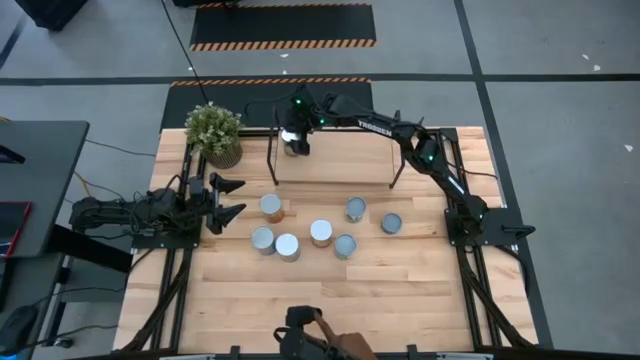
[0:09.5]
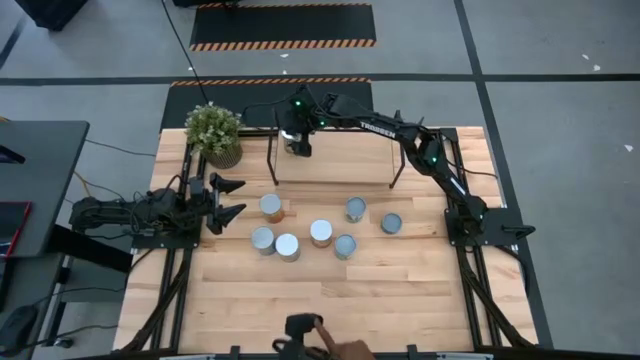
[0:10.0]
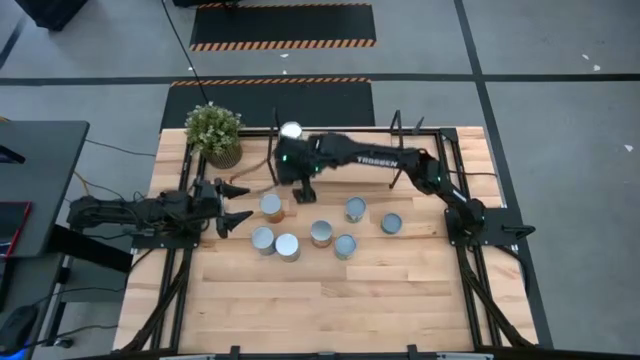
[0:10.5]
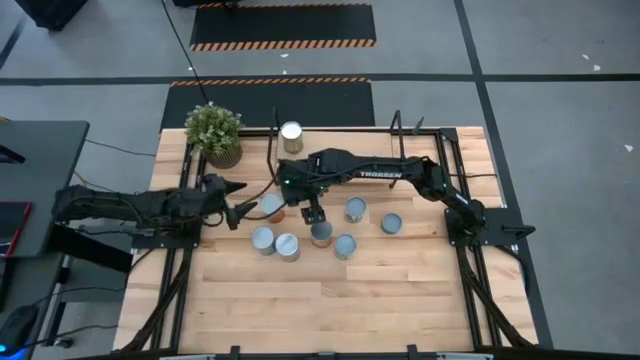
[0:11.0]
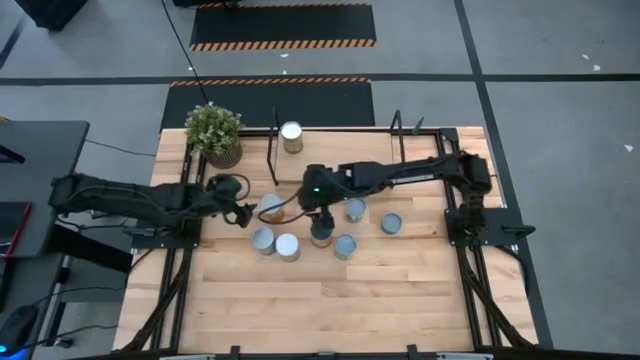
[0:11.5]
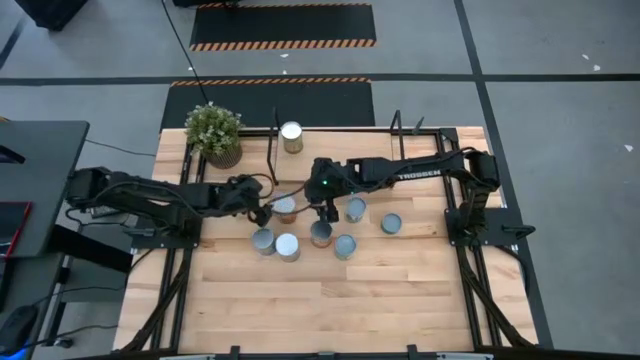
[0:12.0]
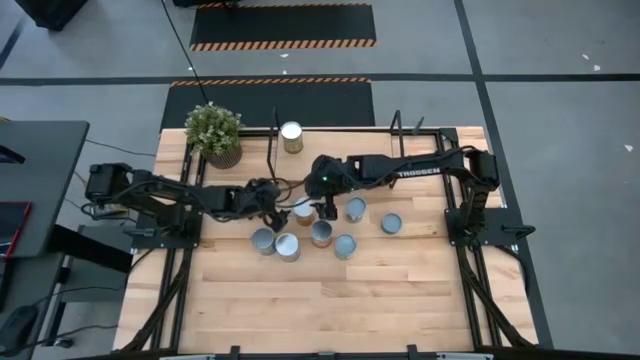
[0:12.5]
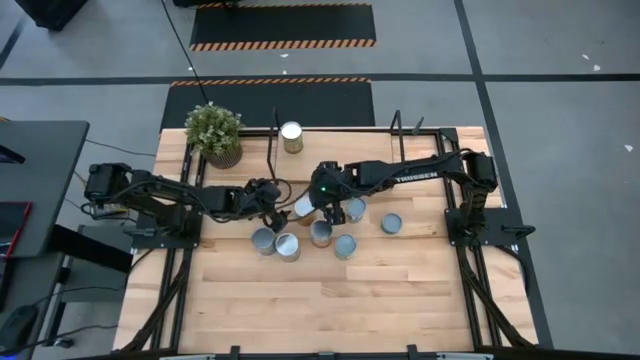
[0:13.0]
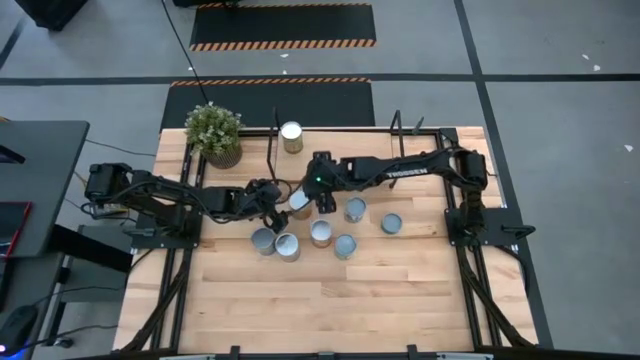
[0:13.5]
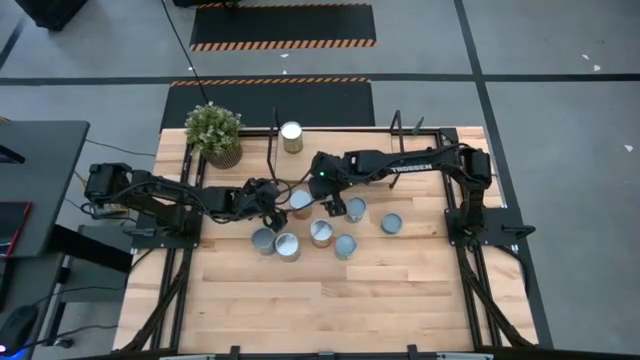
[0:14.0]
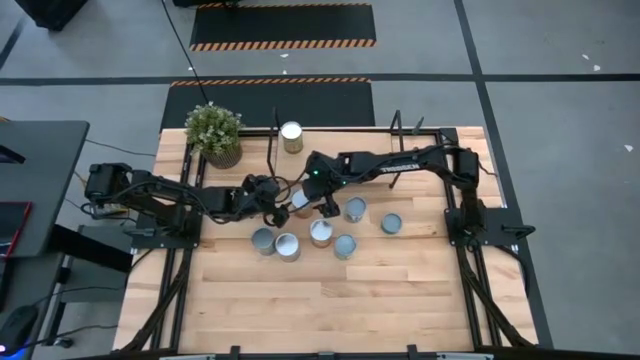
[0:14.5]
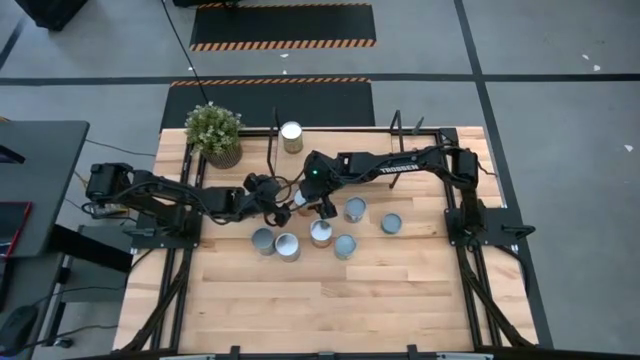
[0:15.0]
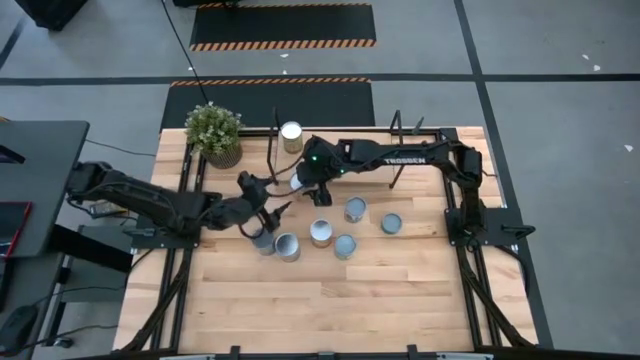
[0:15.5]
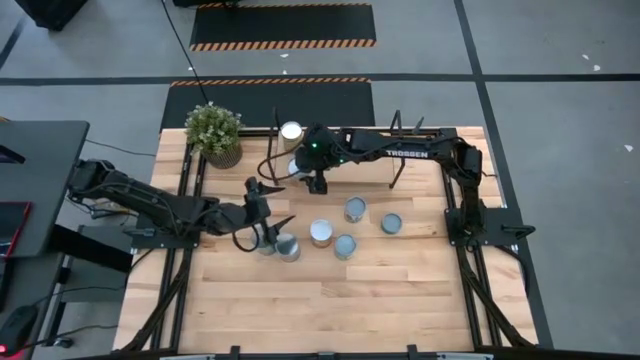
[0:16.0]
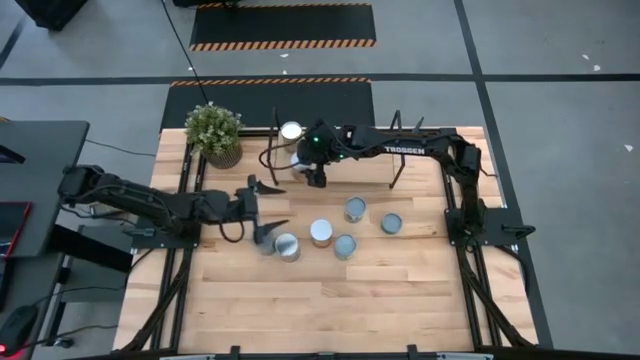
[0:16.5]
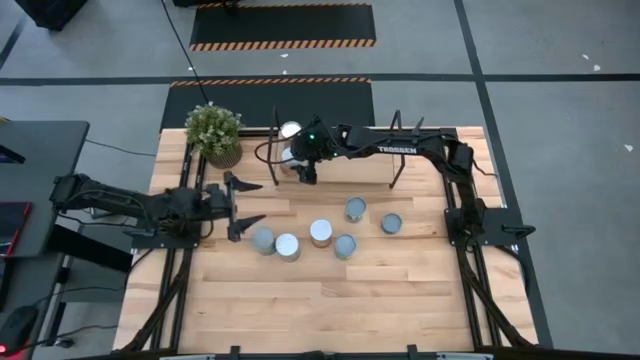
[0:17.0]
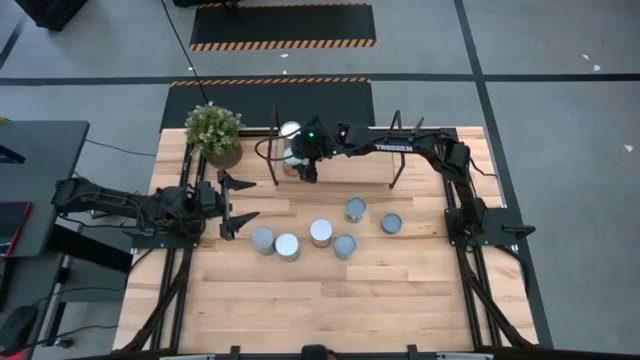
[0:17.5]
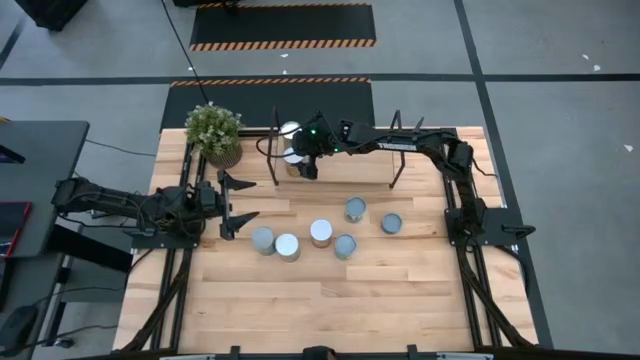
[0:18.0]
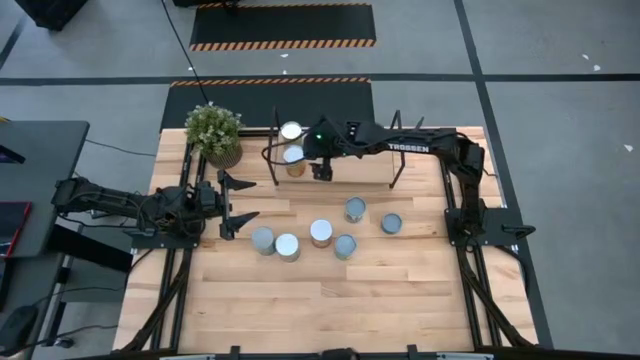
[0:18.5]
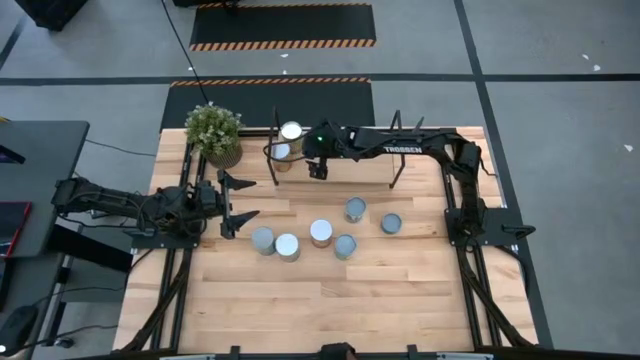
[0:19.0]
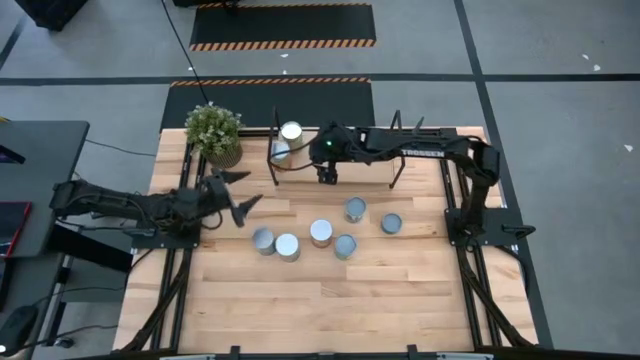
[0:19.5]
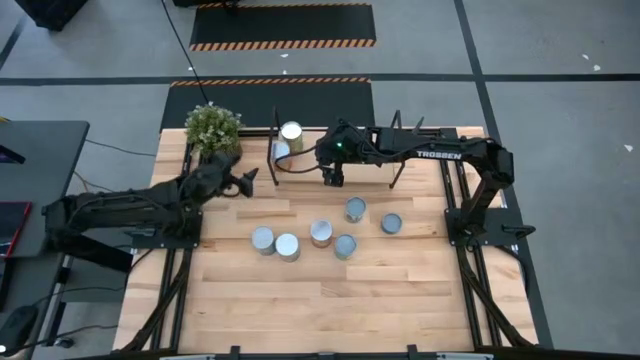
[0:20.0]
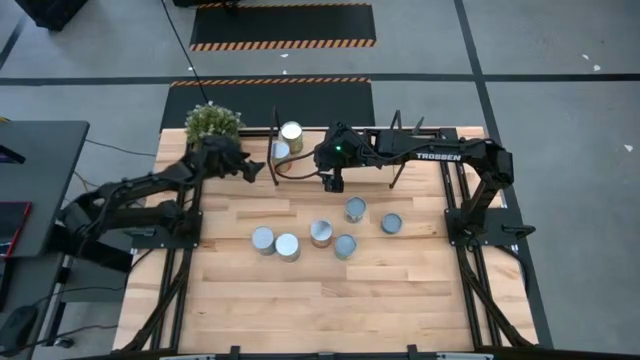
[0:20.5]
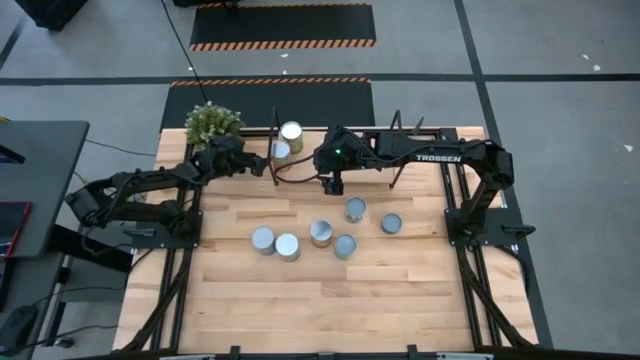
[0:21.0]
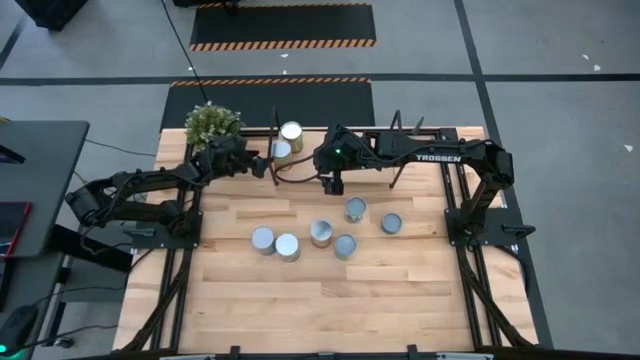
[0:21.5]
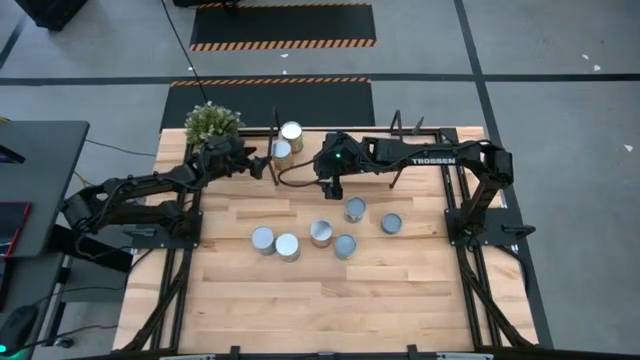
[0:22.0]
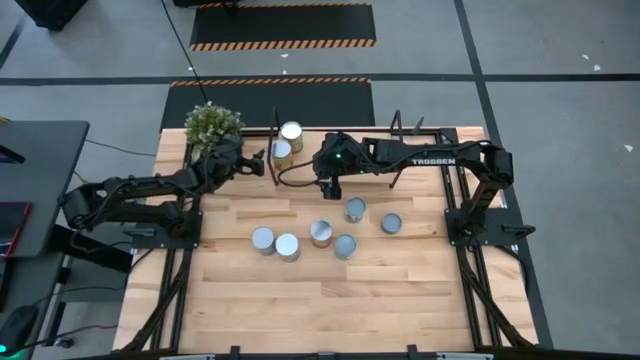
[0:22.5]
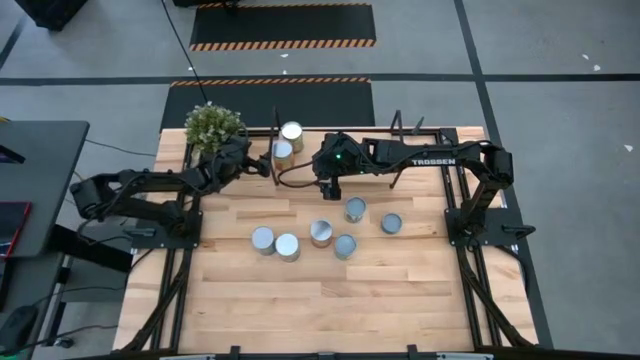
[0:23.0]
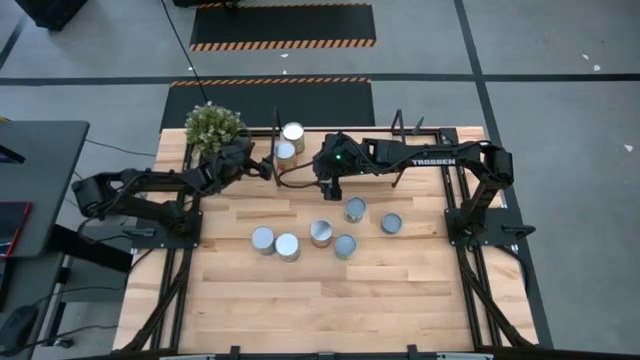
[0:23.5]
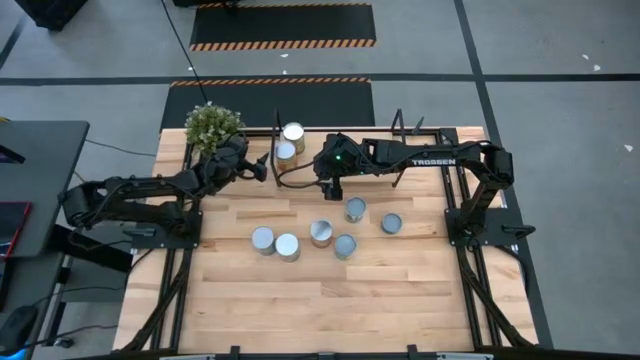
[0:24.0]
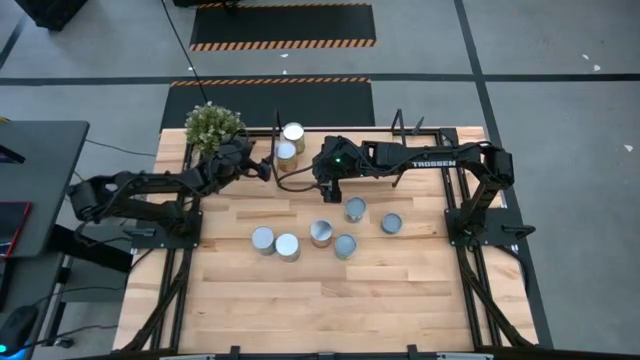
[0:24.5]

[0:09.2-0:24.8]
Task: Pick and place cans onto a shelf
Put the canned pineapple on the shelf
